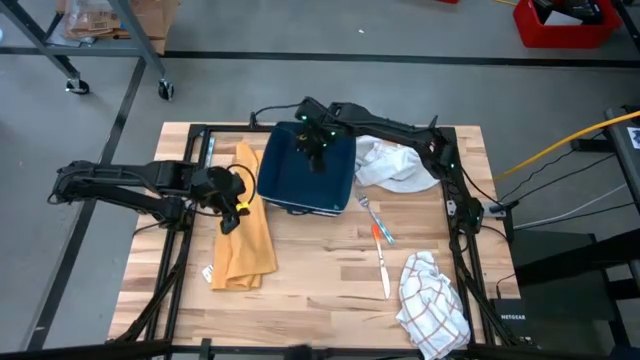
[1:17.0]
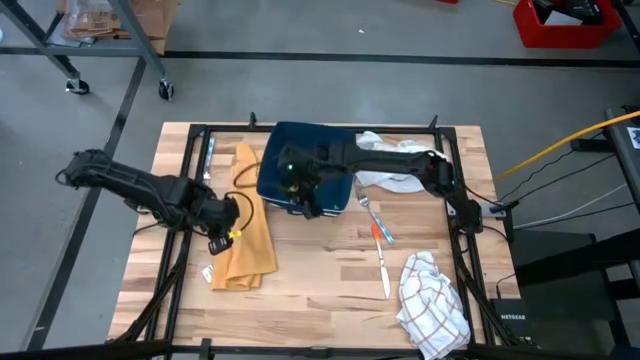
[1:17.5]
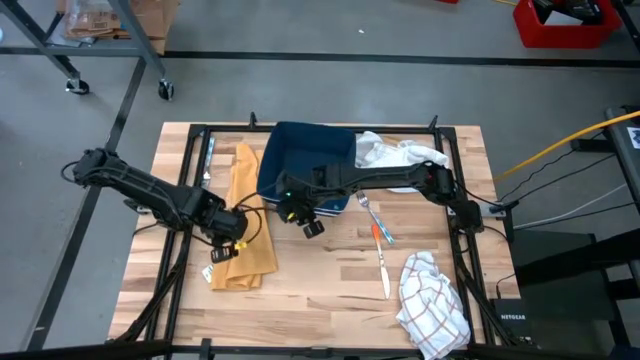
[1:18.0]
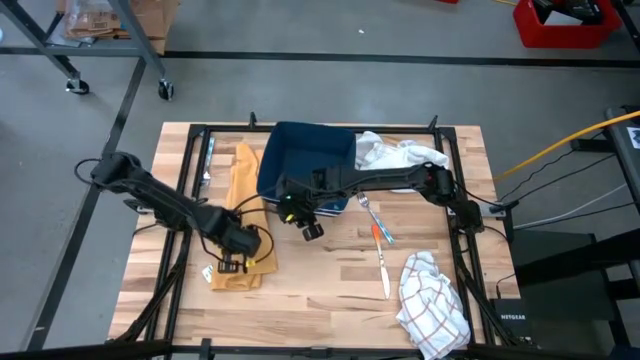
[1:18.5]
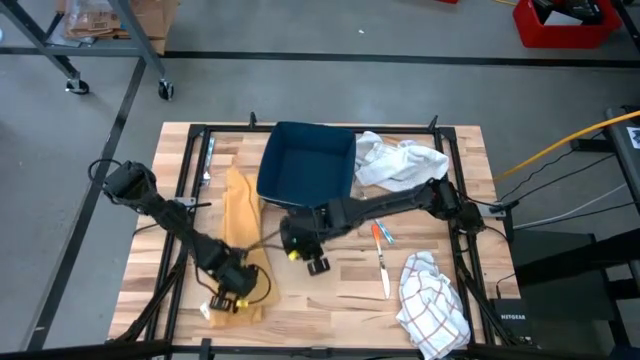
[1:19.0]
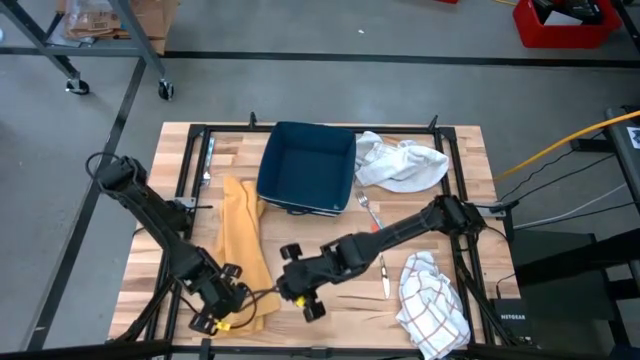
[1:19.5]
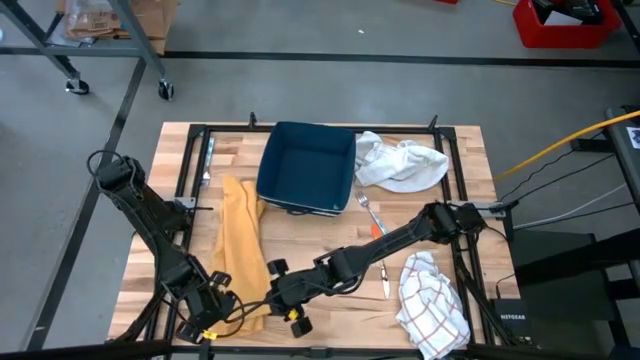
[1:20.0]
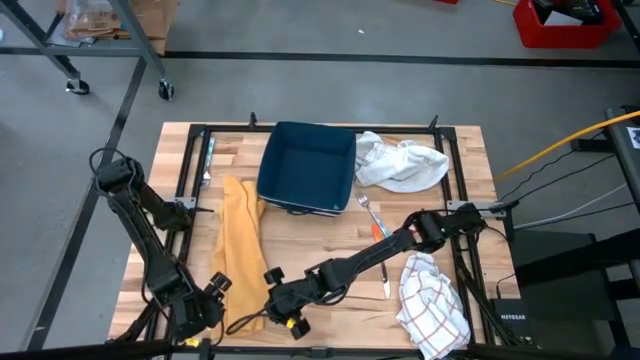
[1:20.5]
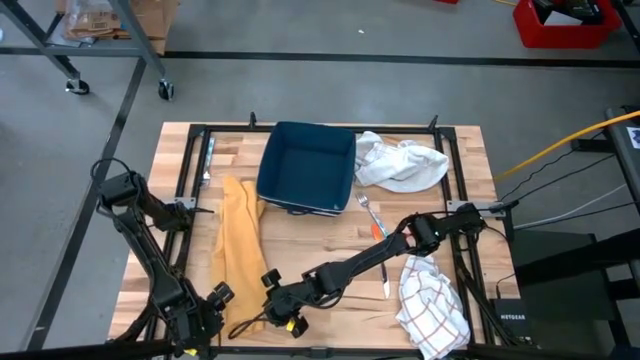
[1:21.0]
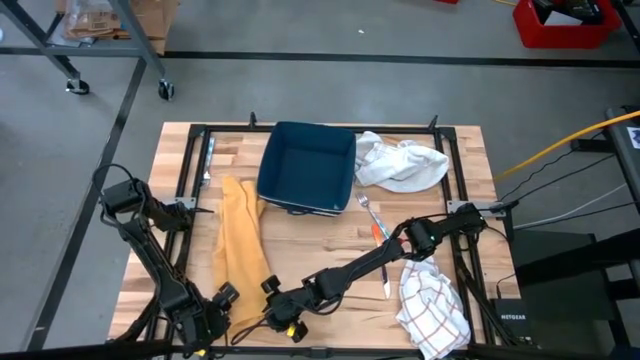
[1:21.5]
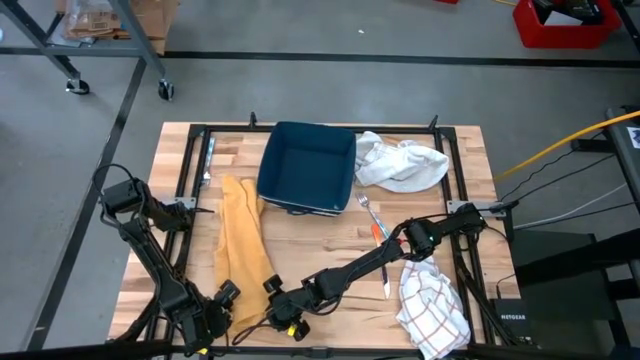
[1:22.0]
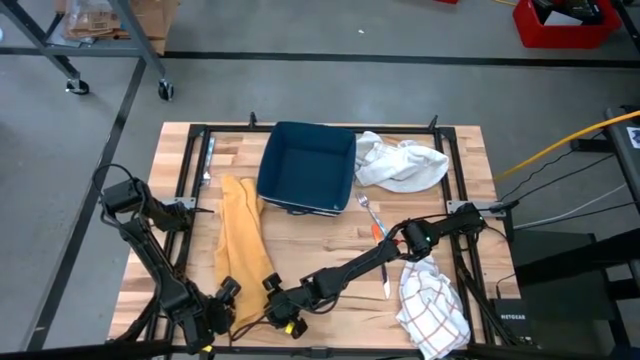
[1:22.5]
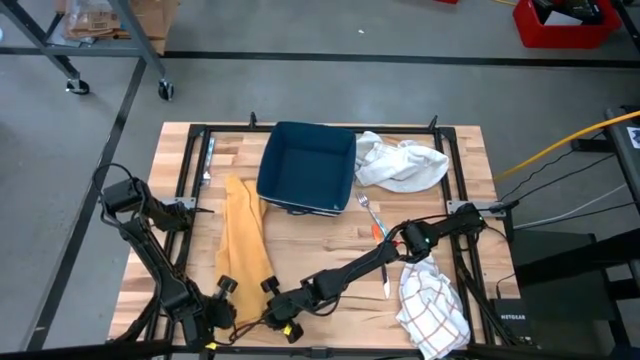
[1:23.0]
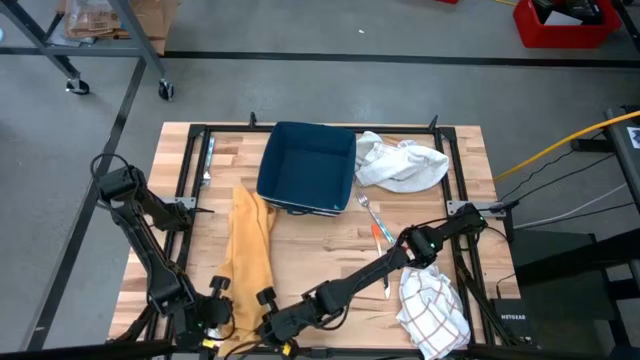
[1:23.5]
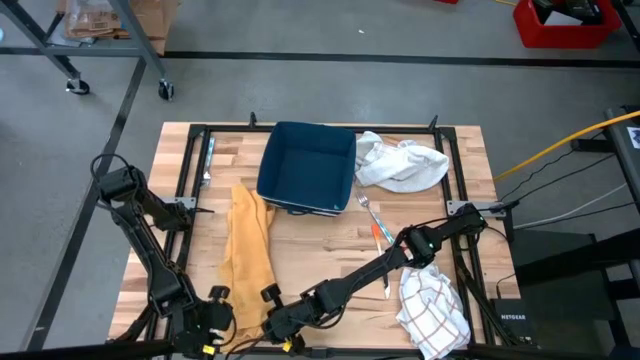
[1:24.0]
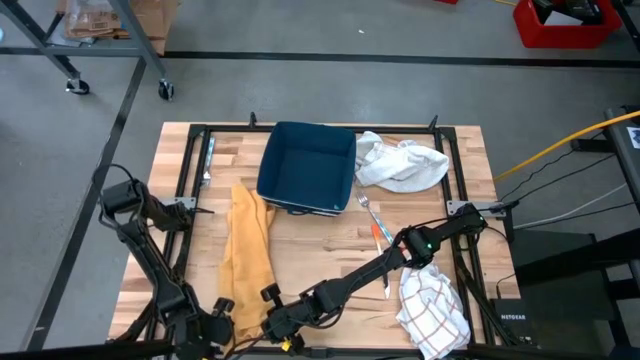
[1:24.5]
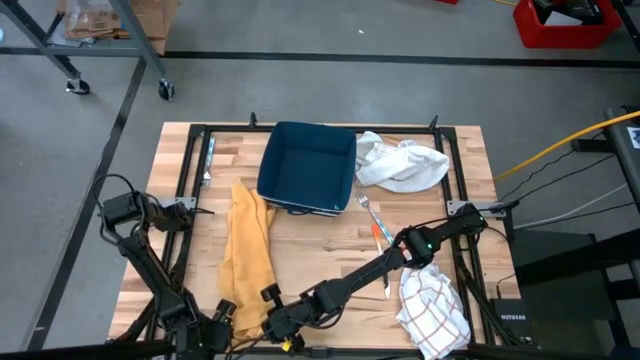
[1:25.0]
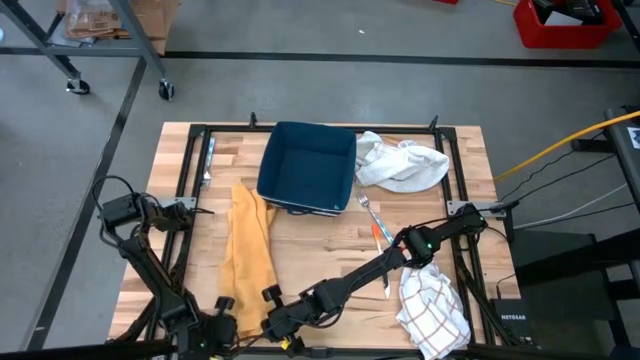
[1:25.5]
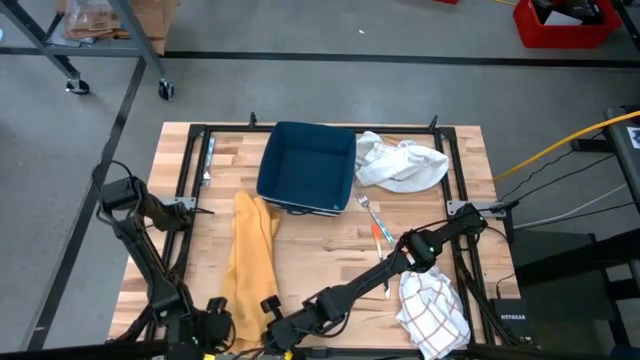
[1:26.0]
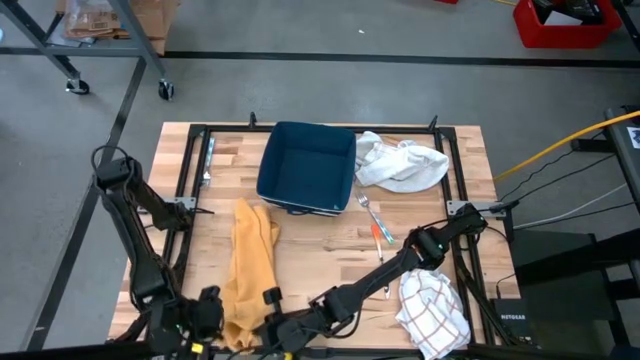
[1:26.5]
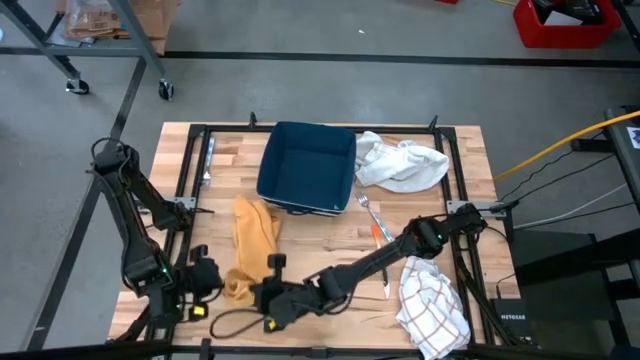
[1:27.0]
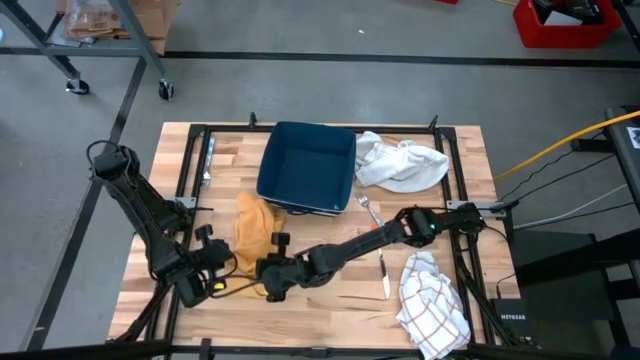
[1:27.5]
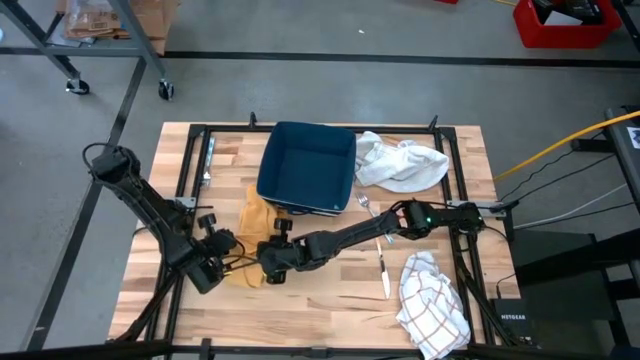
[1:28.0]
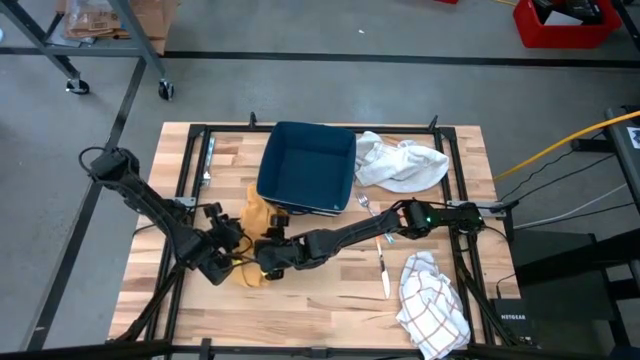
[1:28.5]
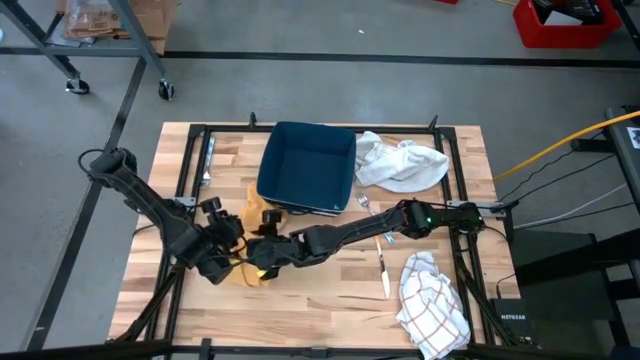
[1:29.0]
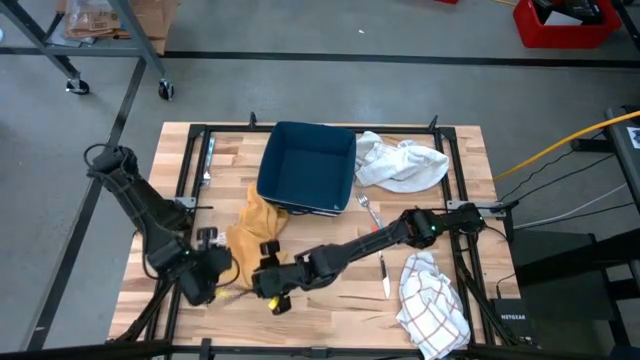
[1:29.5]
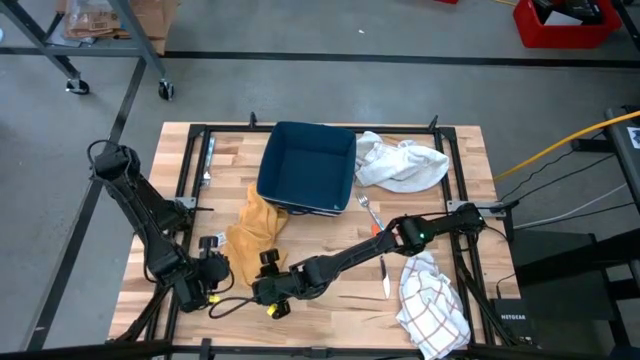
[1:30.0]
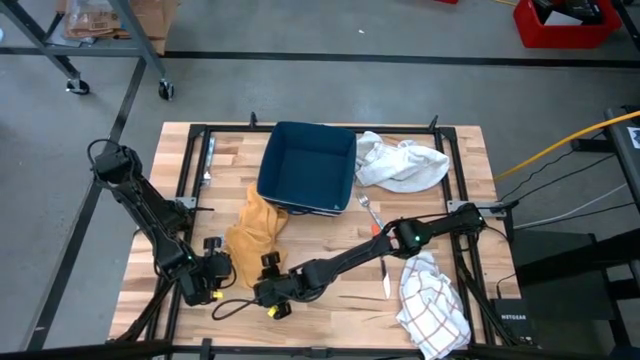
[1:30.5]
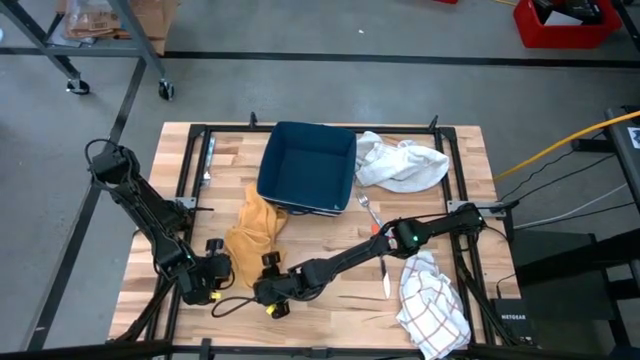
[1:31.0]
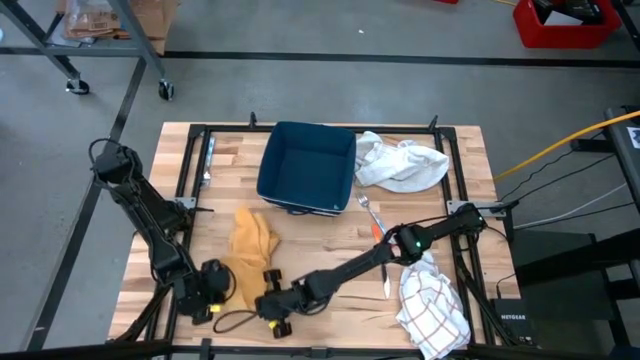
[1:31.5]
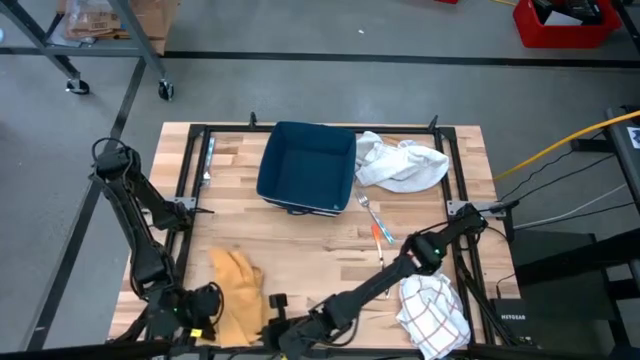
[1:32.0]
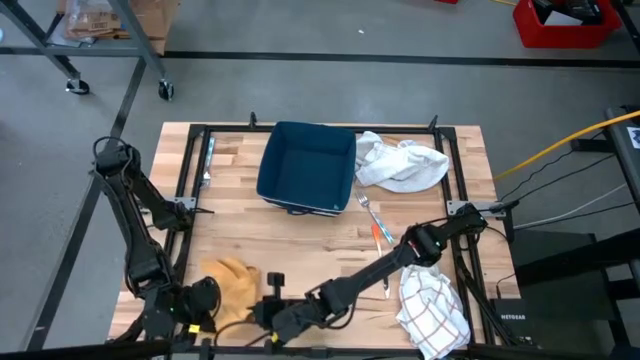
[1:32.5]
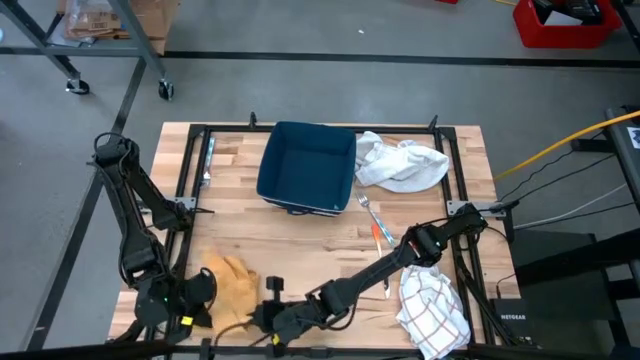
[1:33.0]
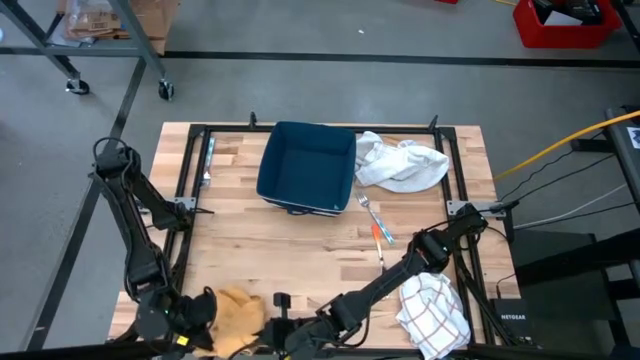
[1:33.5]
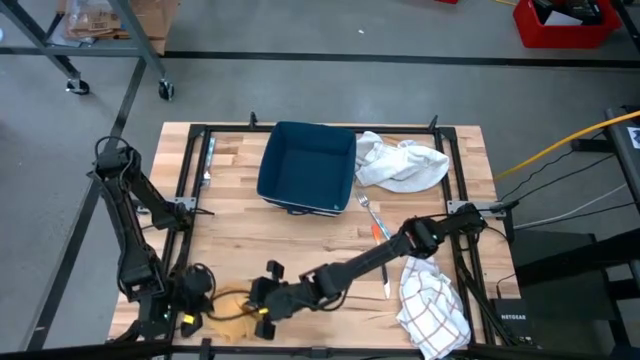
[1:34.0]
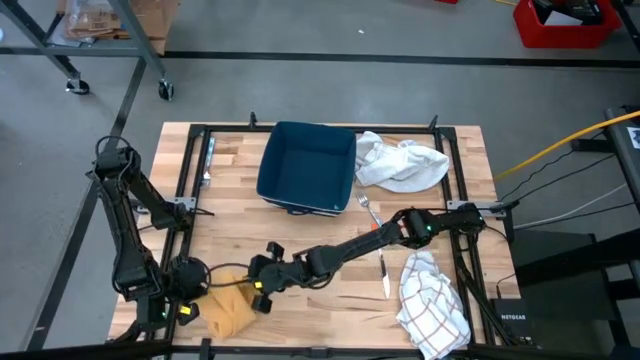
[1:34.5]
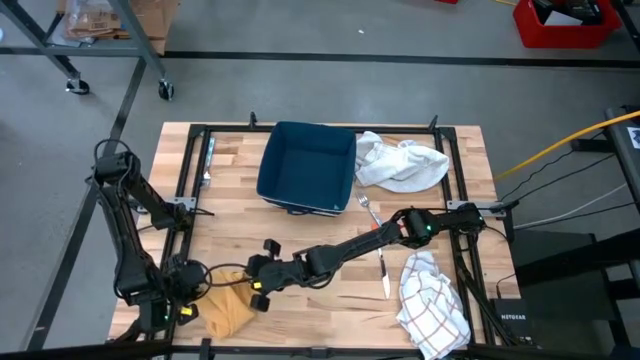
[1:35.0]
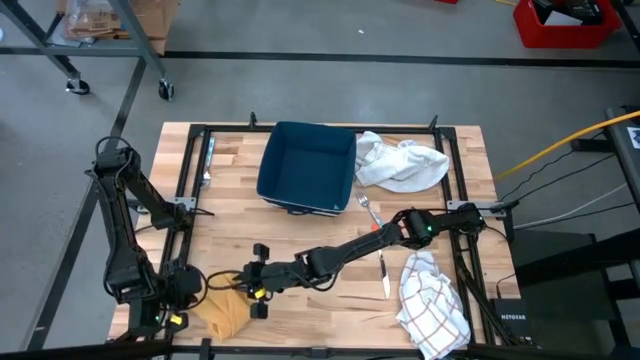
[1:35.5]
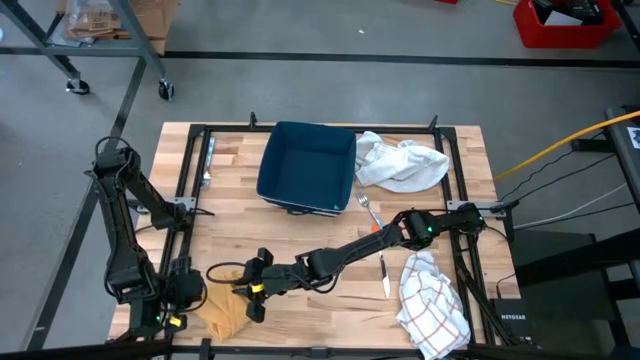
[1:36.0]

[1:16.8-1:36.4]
Task: Fold towel
Fold the yellow towel

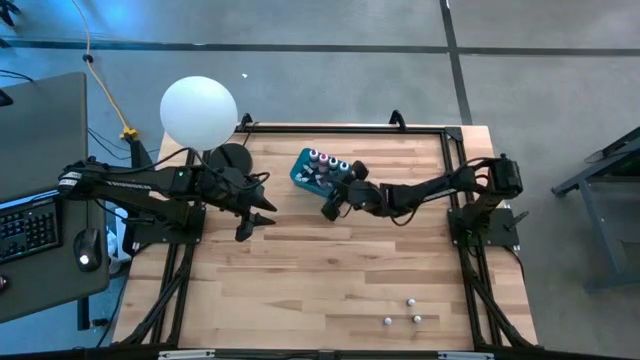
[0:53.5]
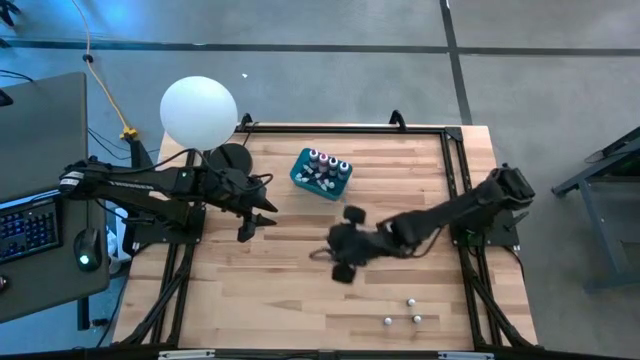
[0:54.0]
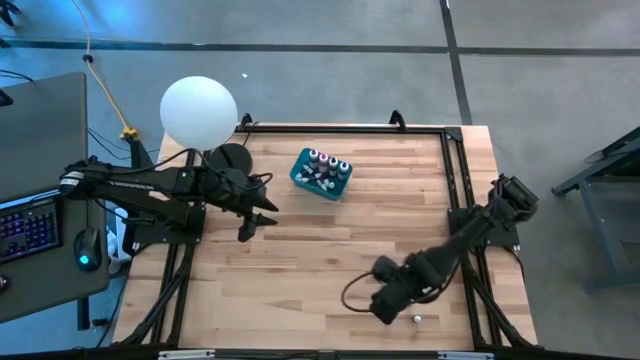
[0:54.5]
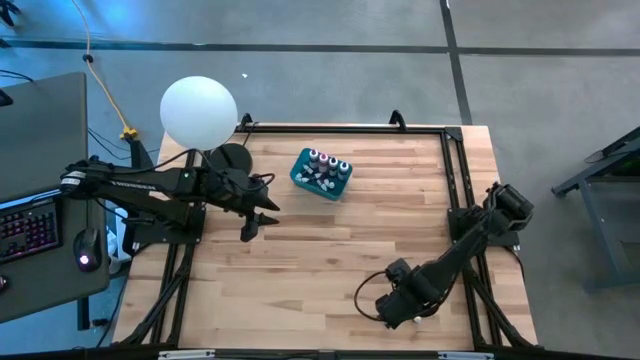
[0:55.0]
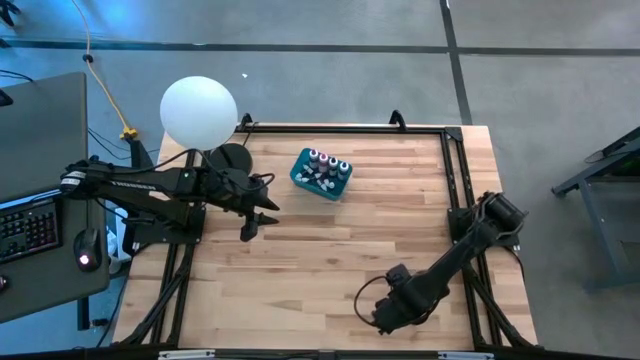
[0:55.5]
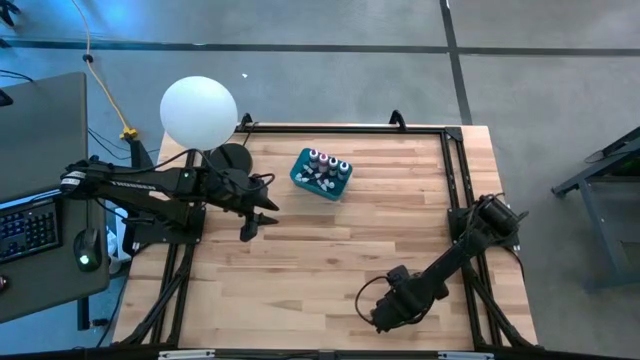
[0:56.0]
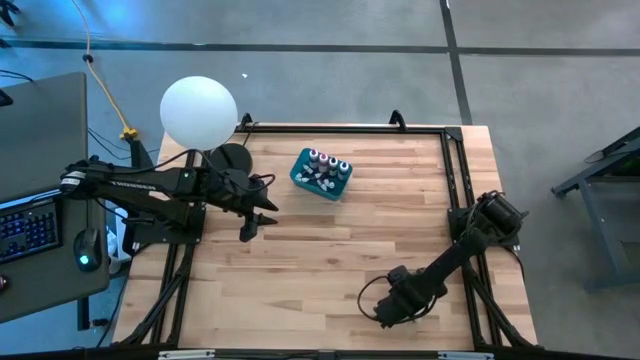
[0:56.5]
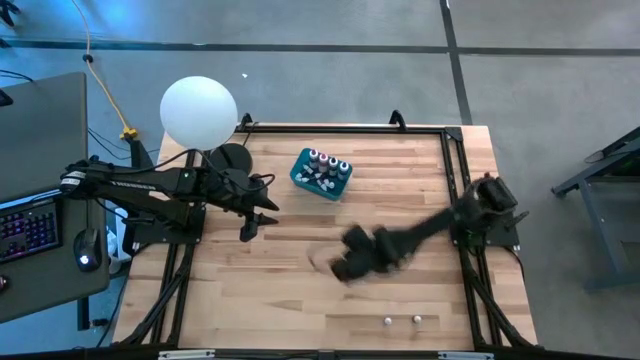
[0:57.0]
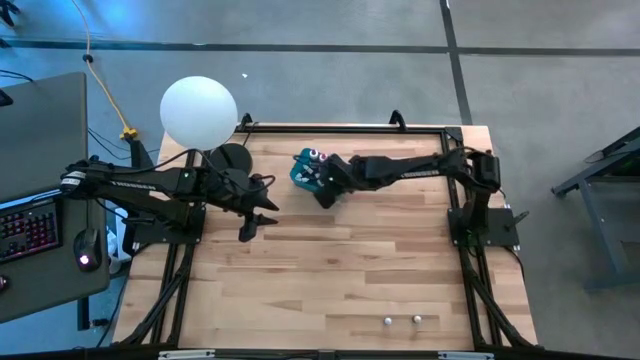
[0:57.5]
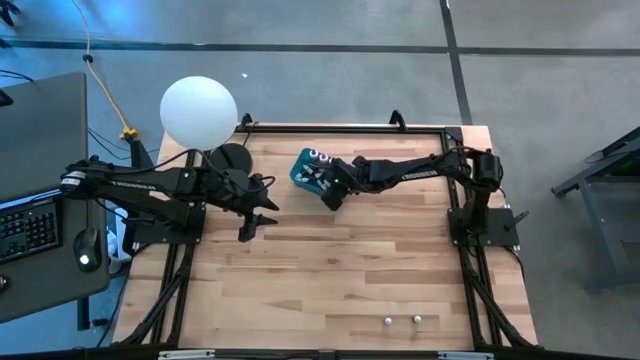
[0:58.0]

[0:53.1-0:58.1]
Task: Pick & Place food coloring
Put the black food coloring bottle into the blue bin
